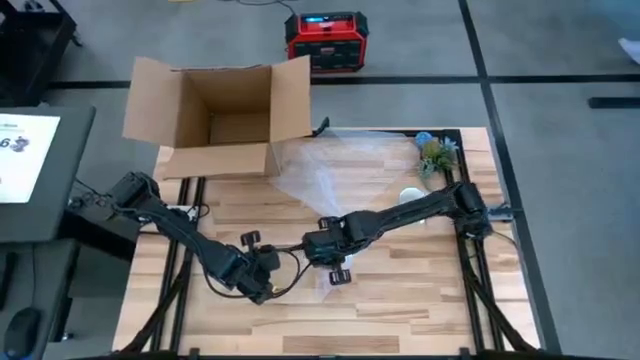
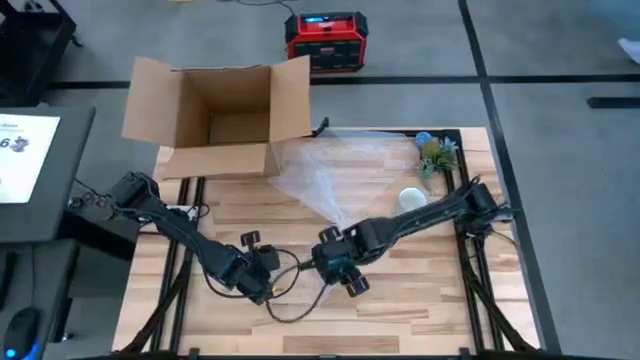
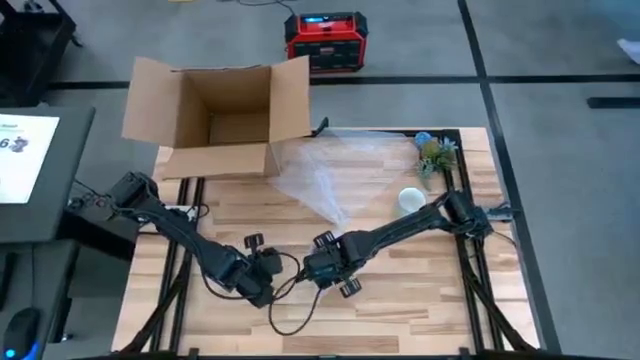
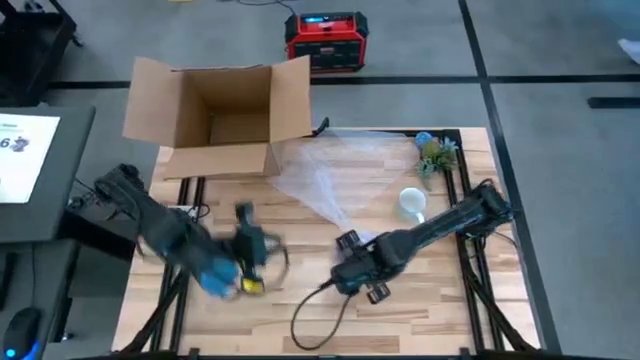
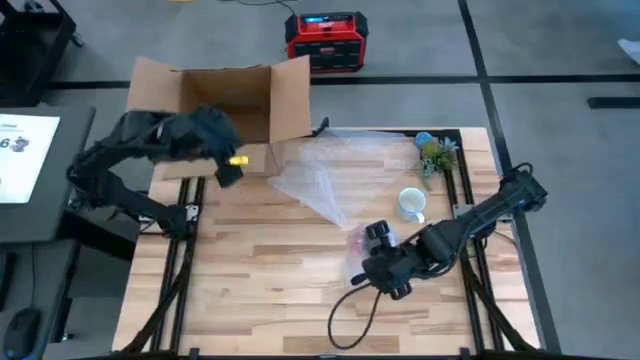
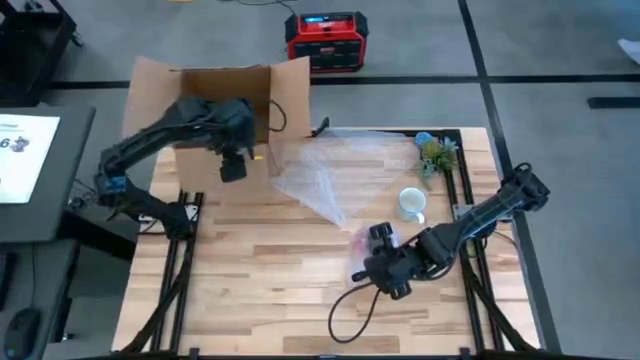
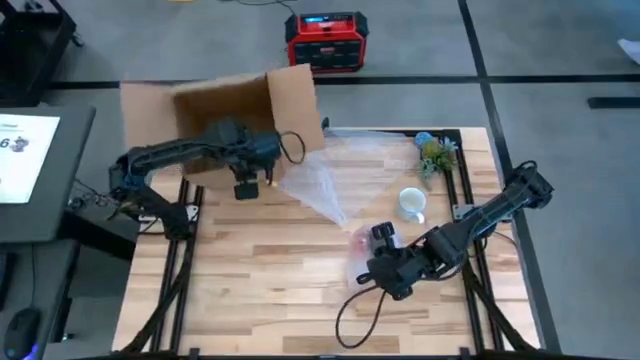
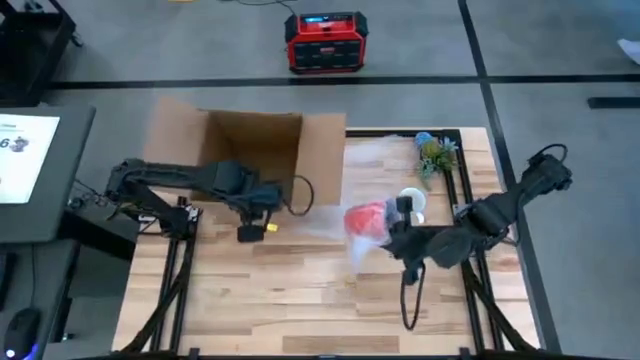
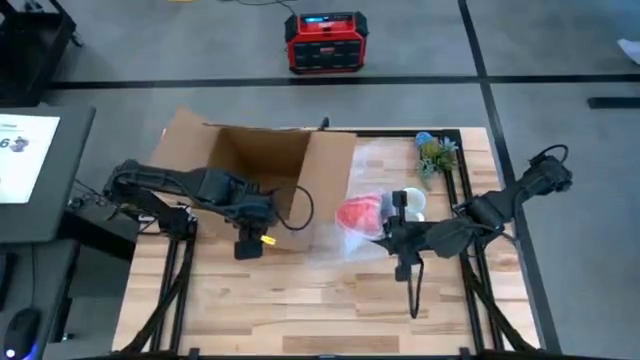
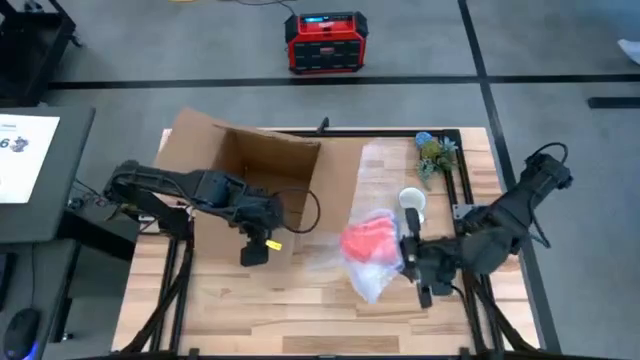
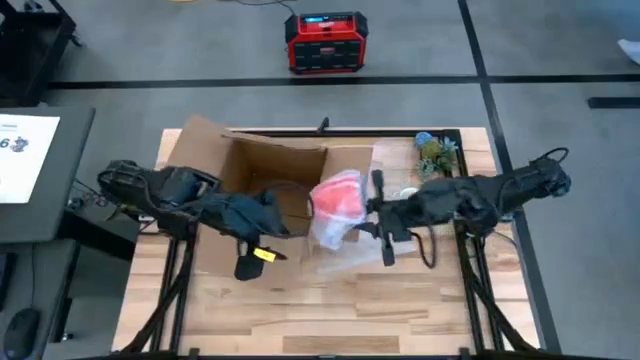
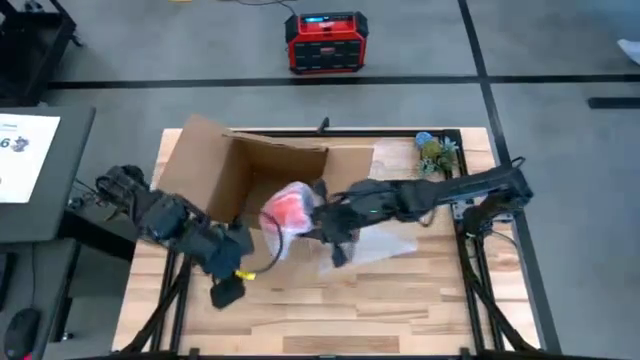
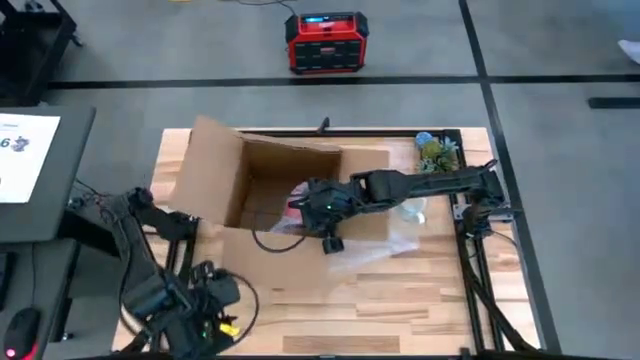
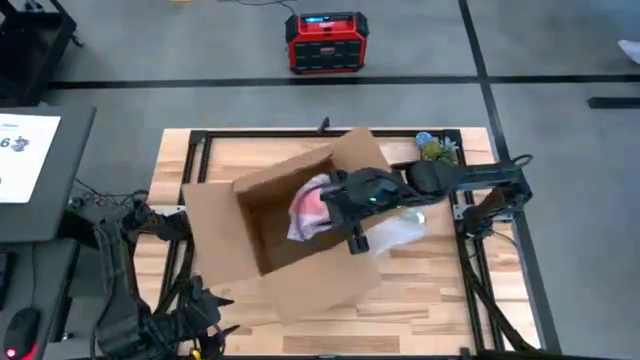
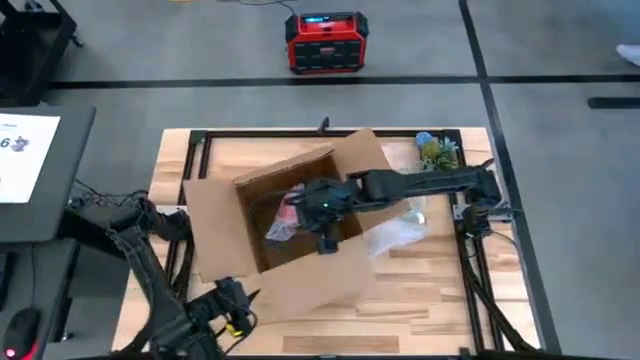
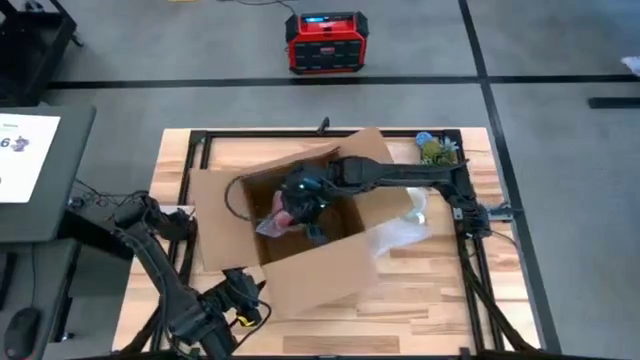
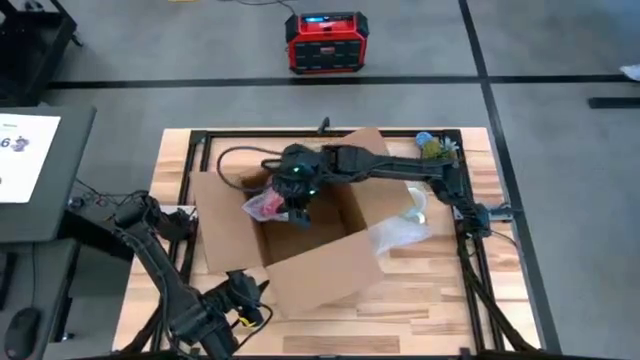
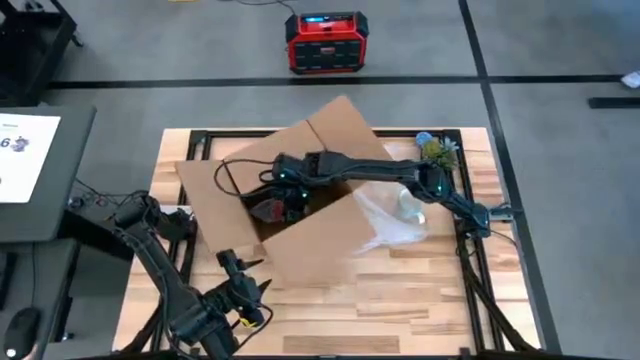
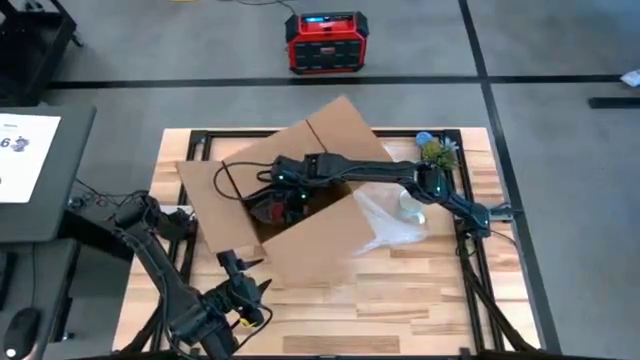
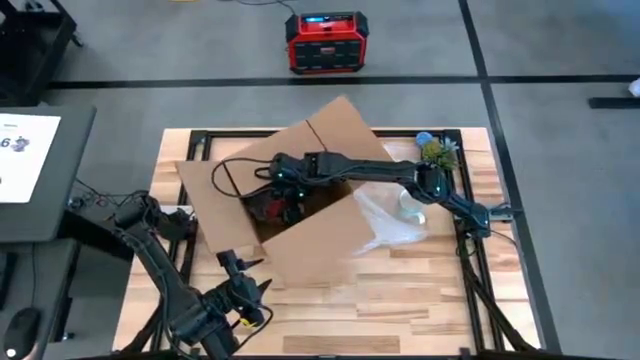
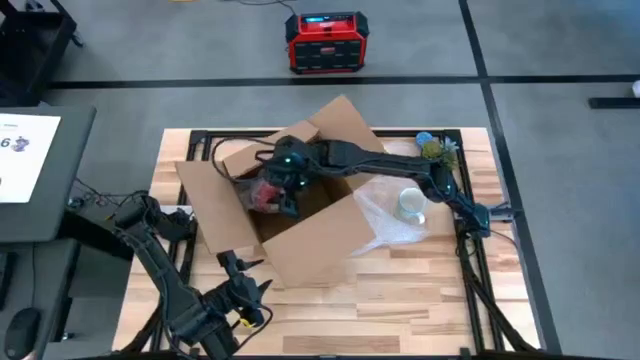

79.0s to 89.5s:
Task: wrap mug
Put the wrapped red mug into the cardboard box

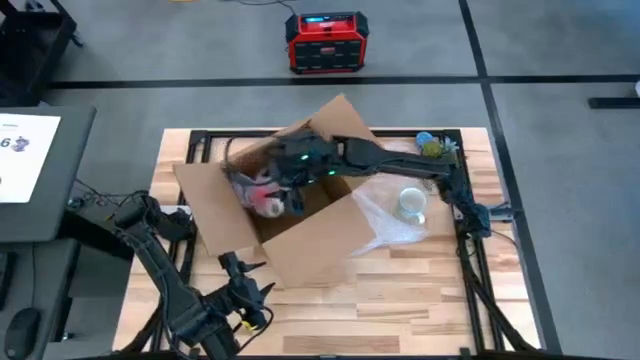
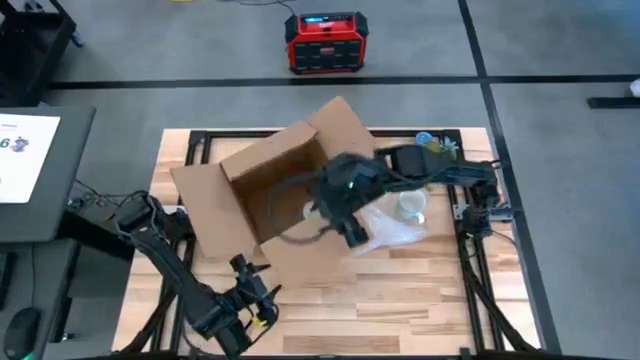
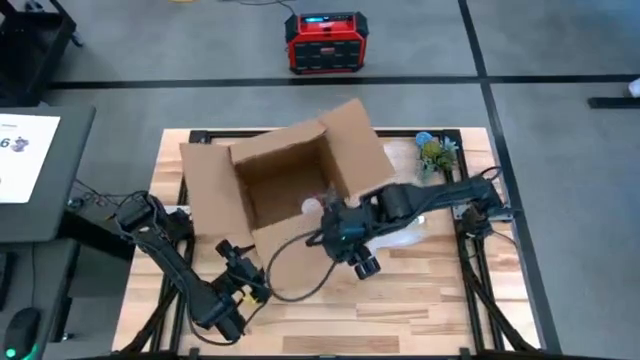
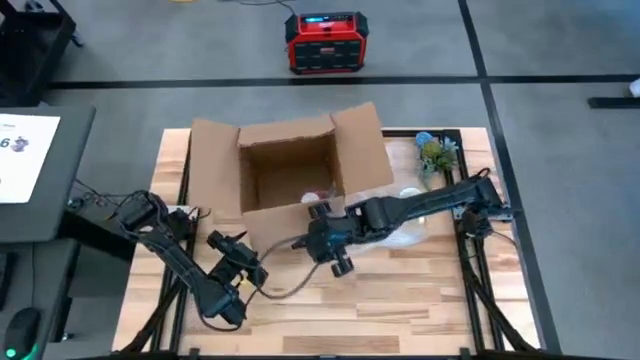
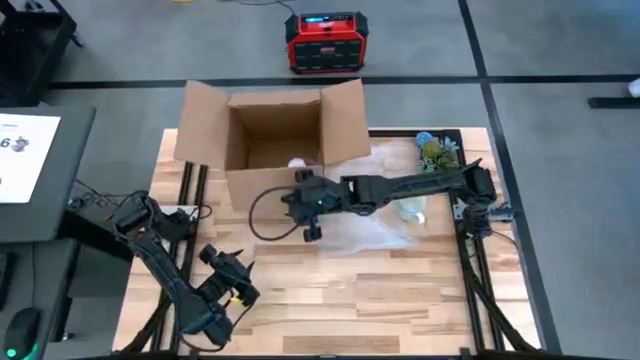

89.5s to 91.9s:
Adjust the cardboard box

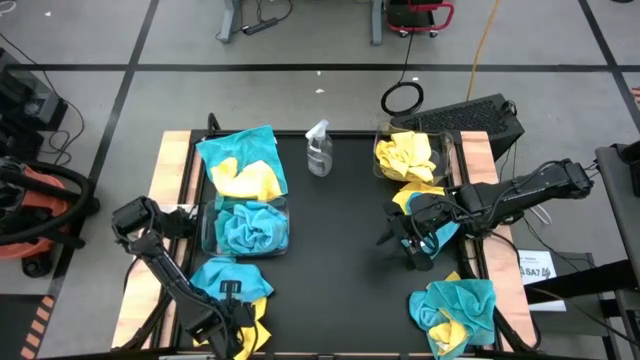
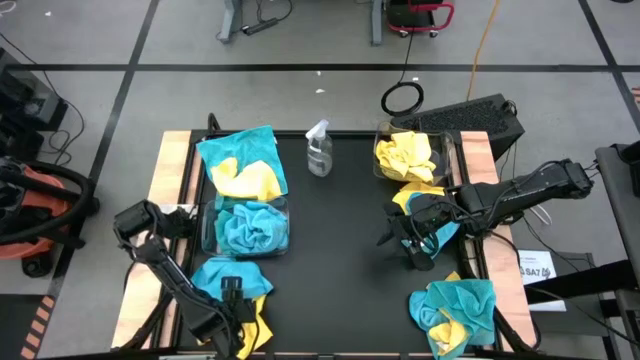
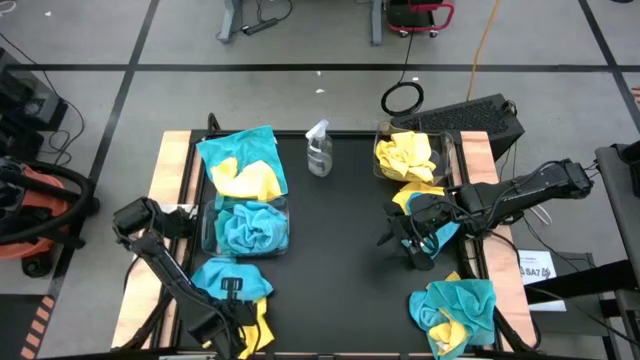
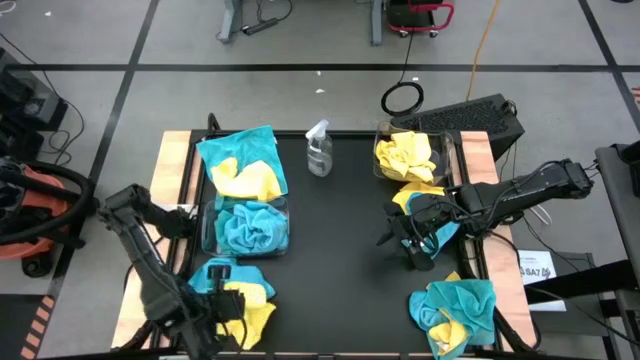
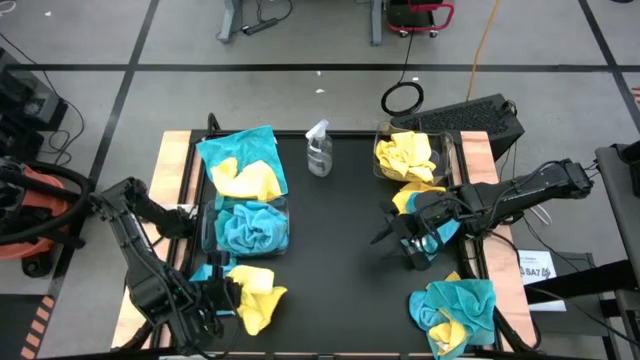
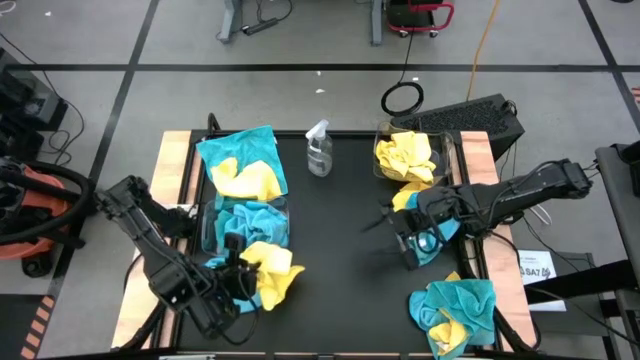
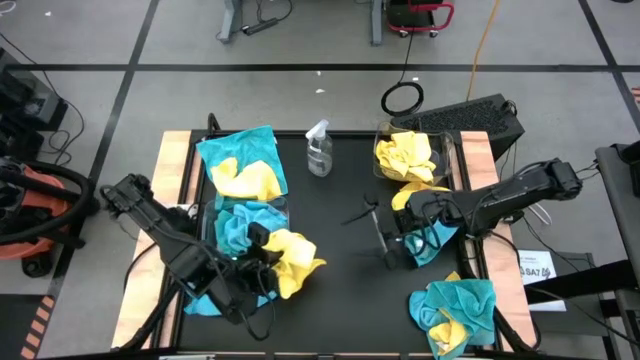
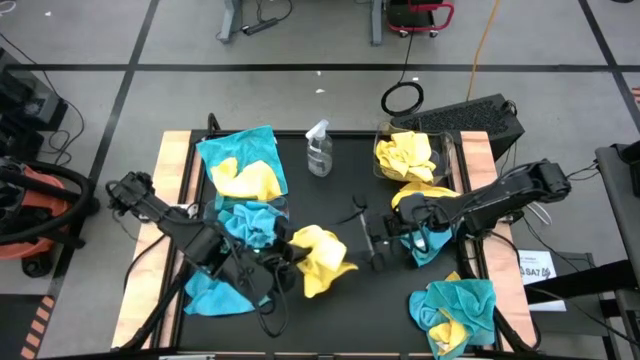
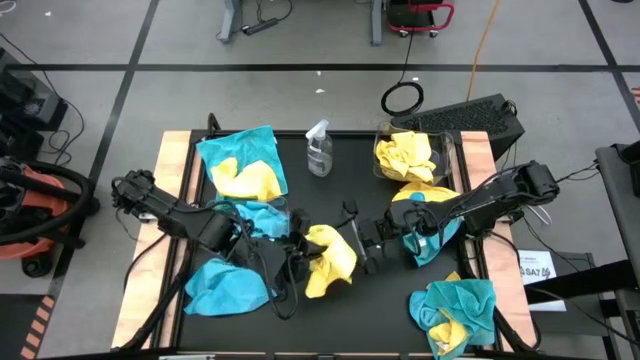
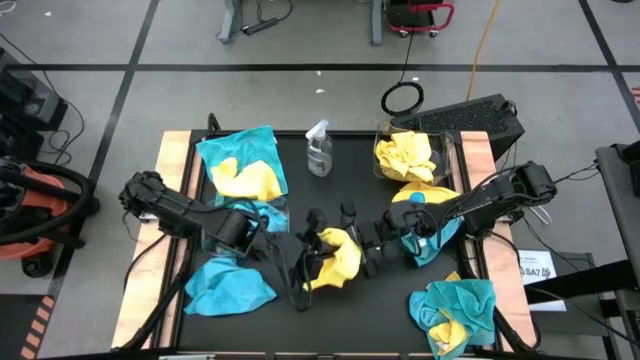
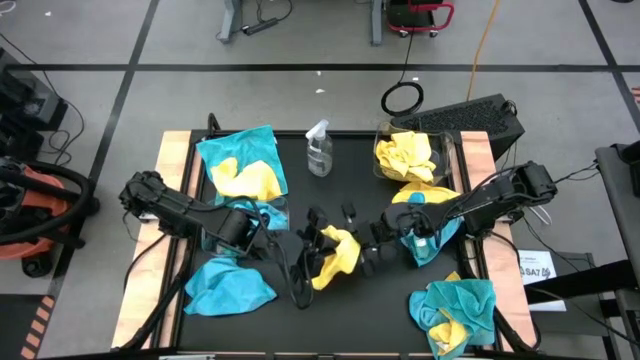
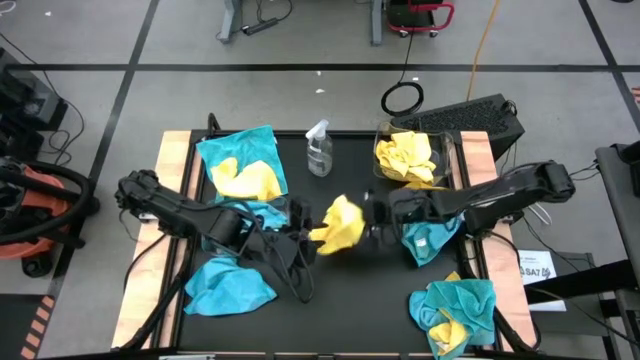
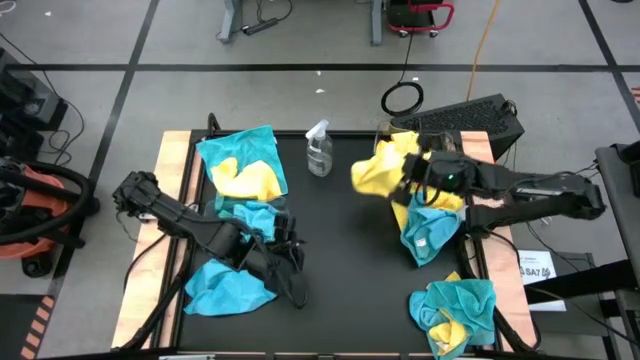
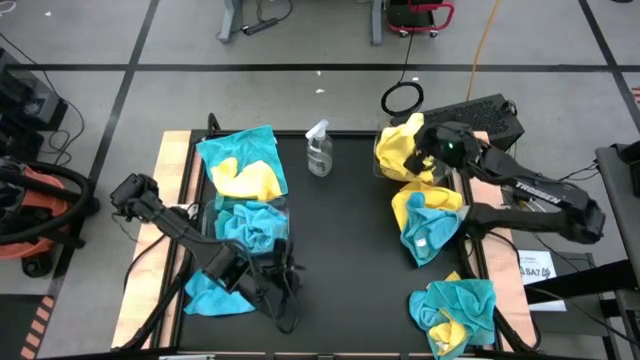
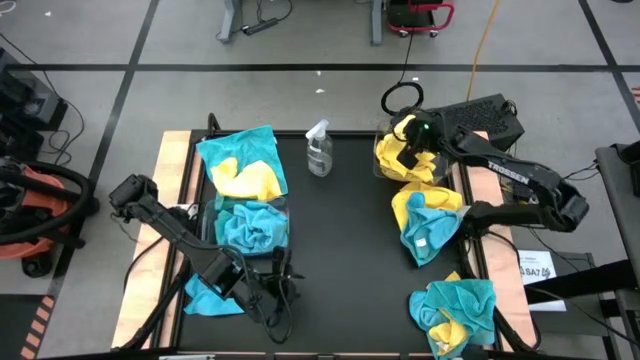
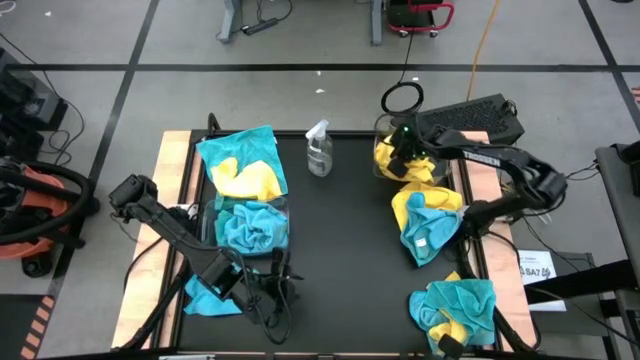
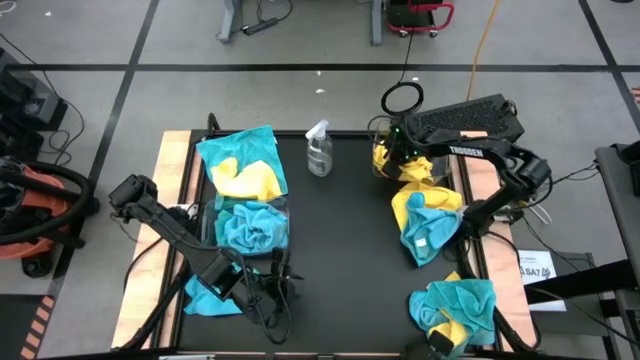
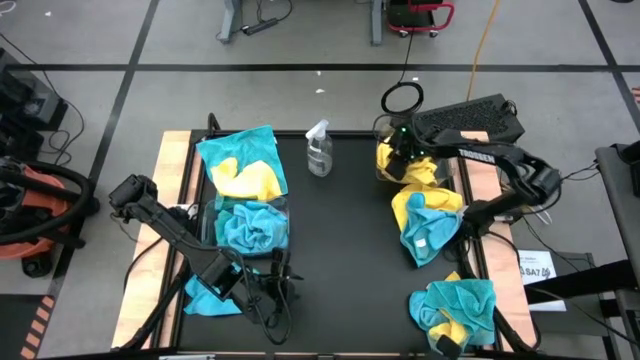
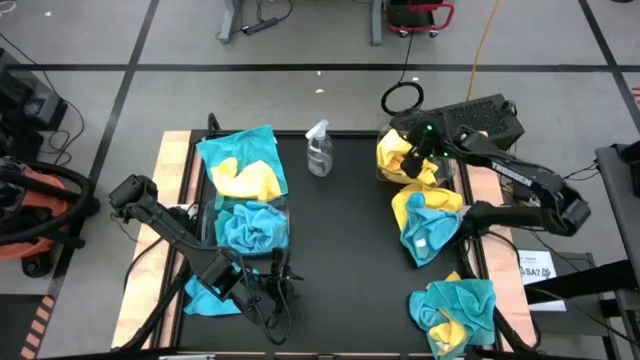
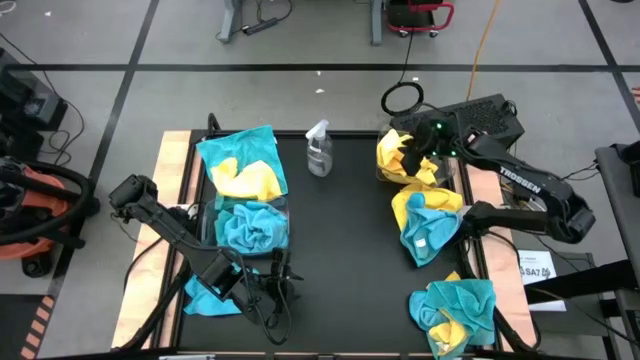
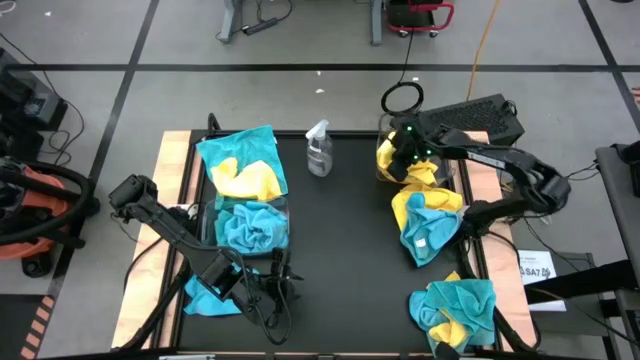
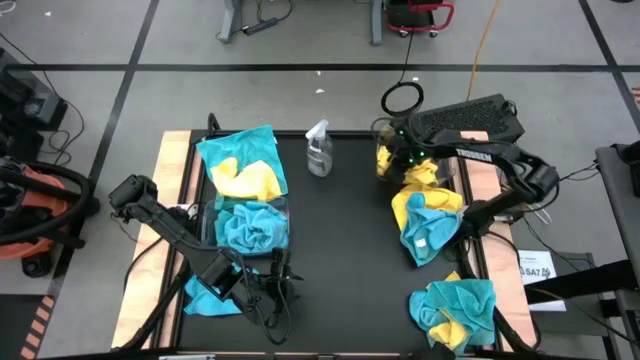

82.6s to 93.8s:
Task: Sort microfiber towel by color & place in baskets
Put the yellow towel into the top transparent bin
